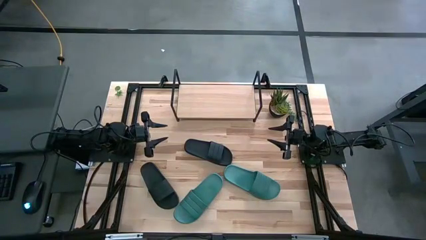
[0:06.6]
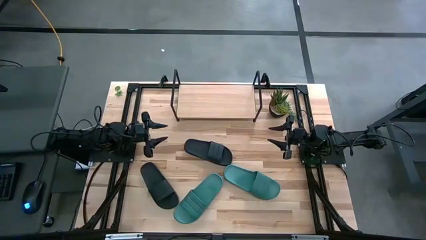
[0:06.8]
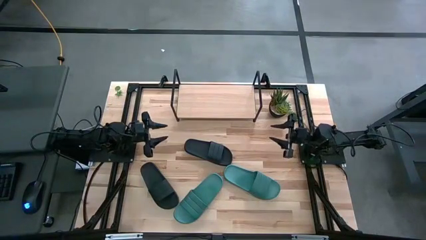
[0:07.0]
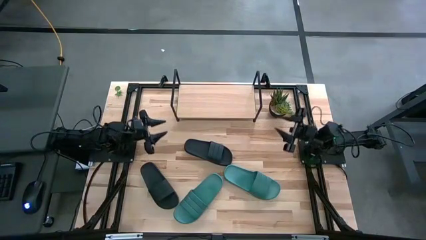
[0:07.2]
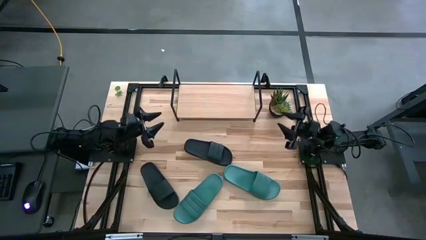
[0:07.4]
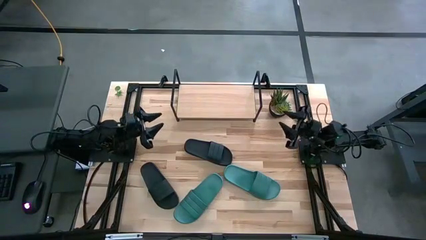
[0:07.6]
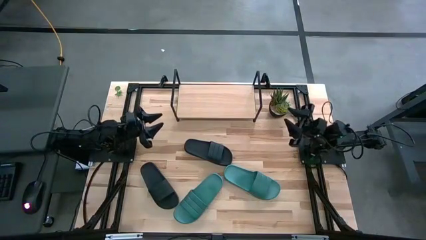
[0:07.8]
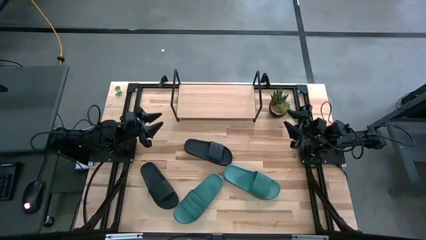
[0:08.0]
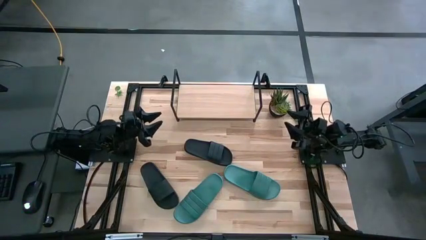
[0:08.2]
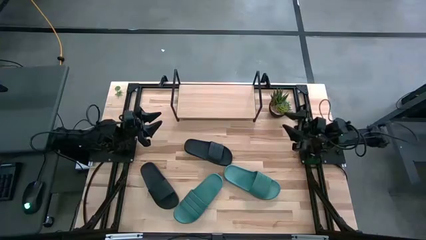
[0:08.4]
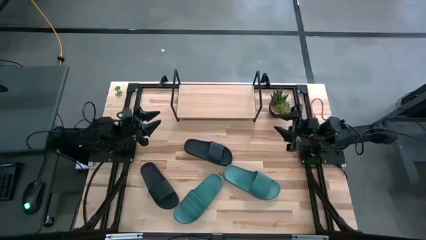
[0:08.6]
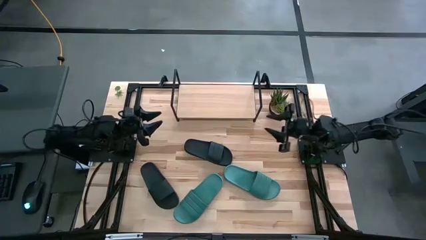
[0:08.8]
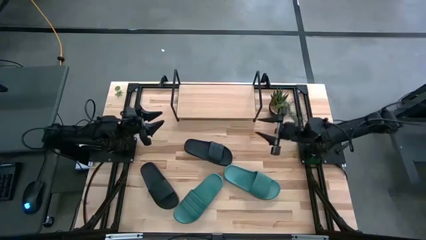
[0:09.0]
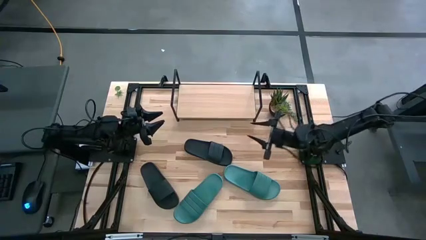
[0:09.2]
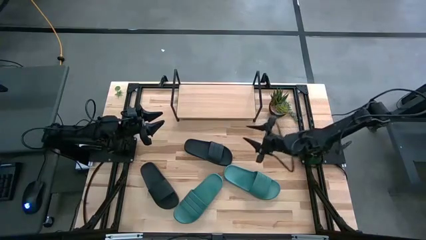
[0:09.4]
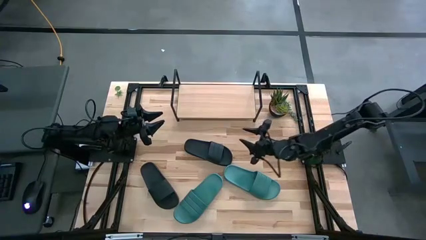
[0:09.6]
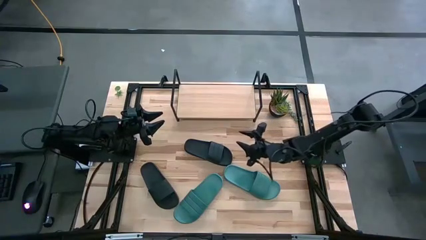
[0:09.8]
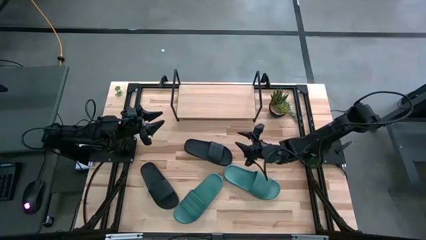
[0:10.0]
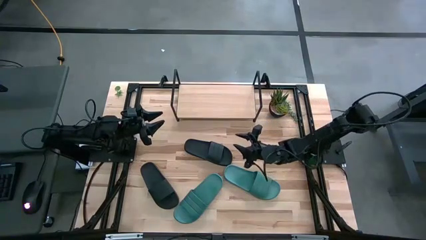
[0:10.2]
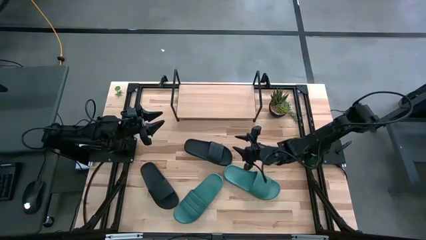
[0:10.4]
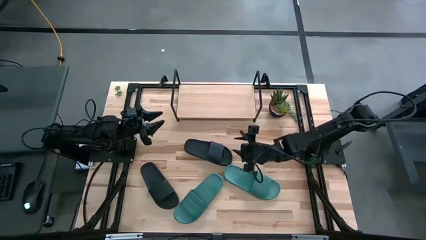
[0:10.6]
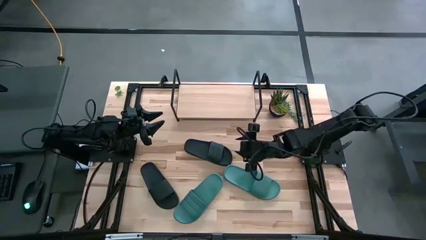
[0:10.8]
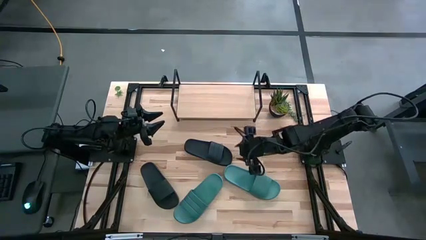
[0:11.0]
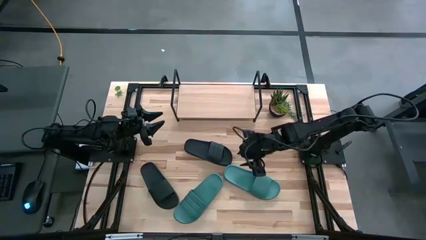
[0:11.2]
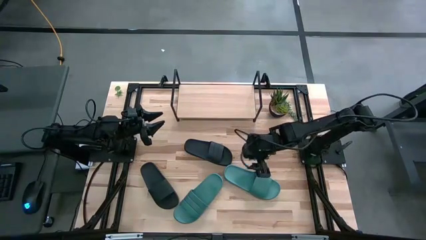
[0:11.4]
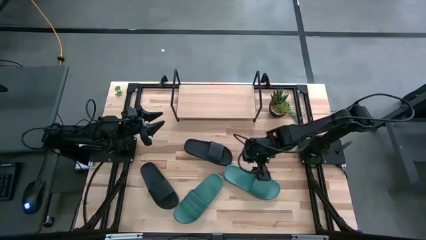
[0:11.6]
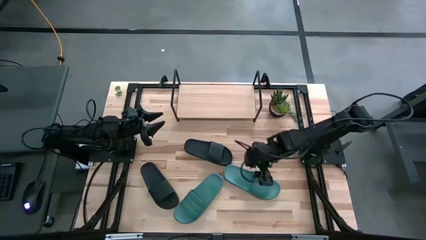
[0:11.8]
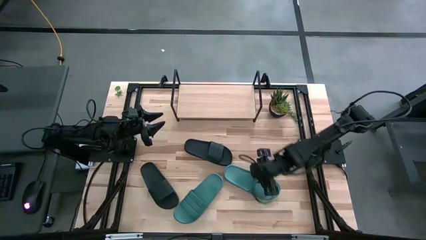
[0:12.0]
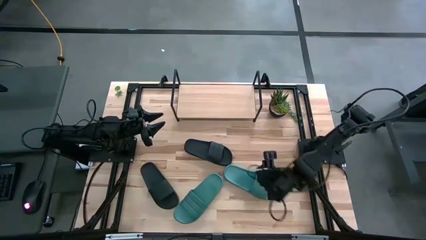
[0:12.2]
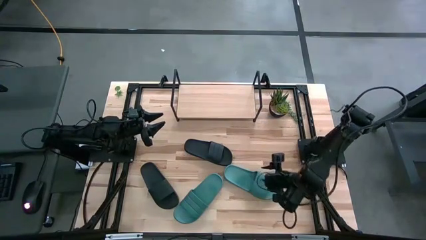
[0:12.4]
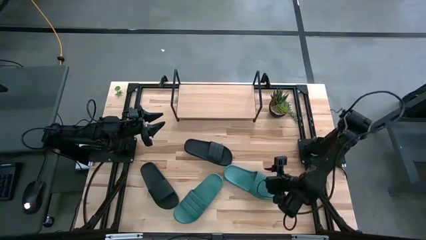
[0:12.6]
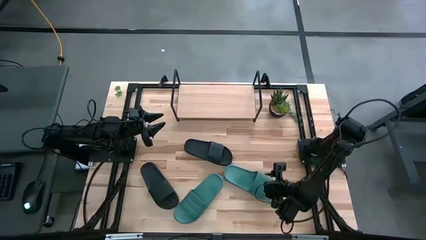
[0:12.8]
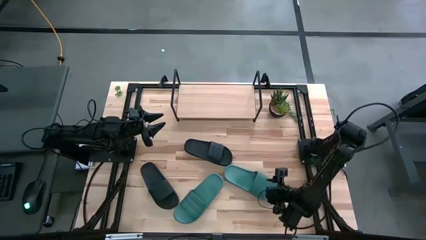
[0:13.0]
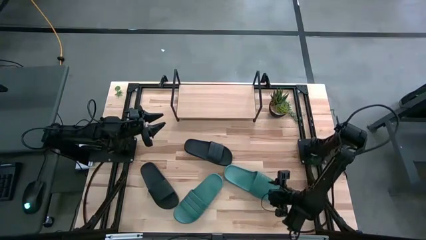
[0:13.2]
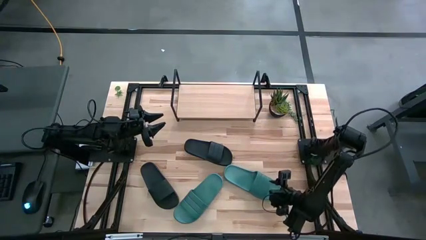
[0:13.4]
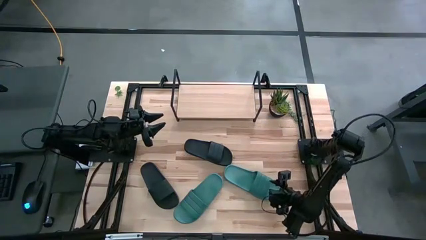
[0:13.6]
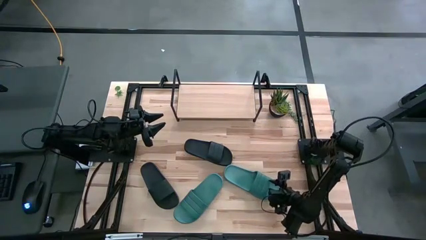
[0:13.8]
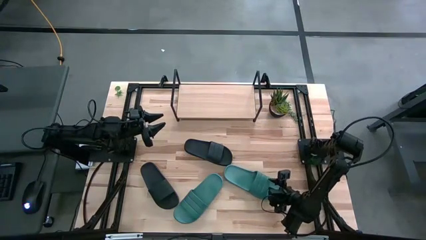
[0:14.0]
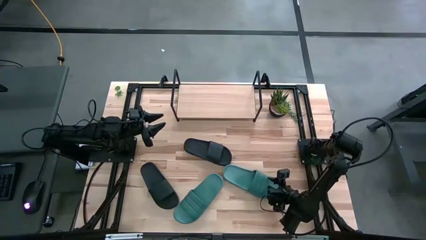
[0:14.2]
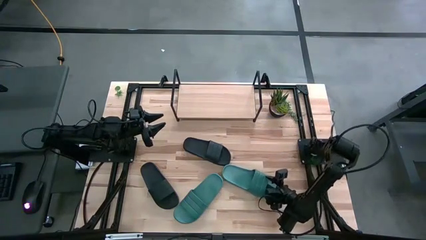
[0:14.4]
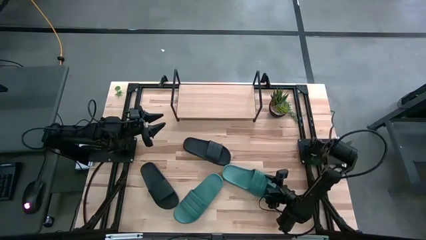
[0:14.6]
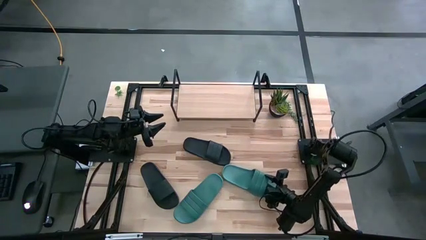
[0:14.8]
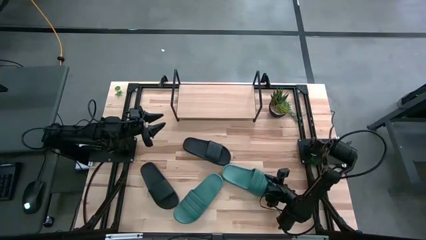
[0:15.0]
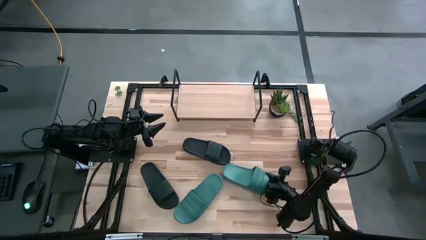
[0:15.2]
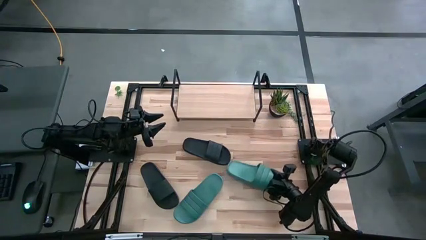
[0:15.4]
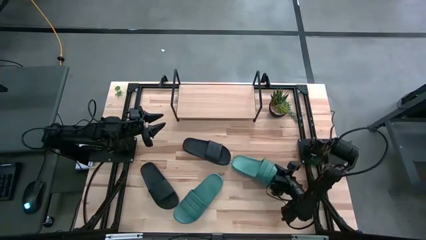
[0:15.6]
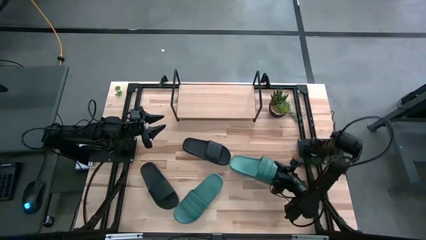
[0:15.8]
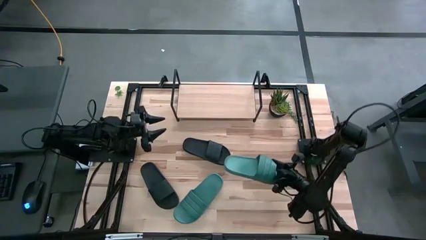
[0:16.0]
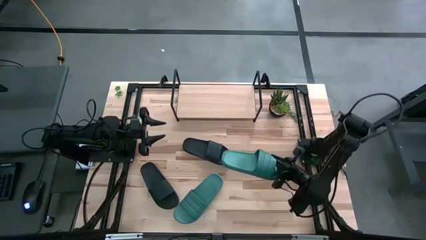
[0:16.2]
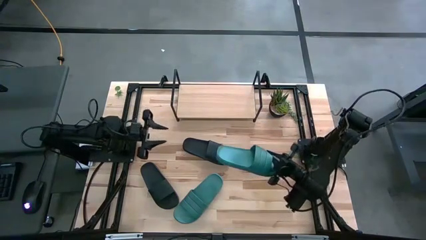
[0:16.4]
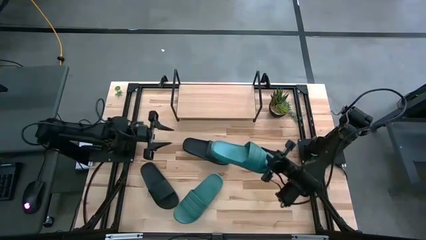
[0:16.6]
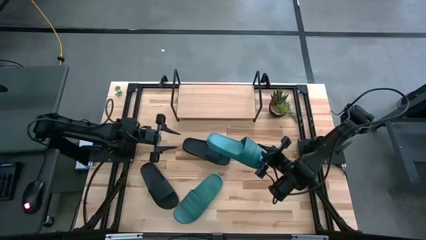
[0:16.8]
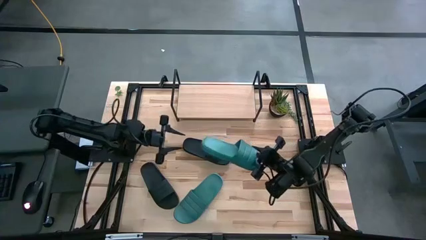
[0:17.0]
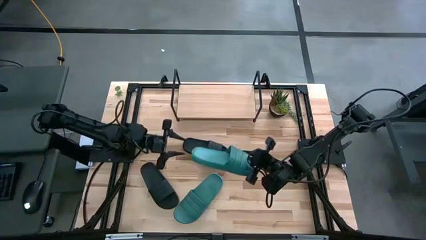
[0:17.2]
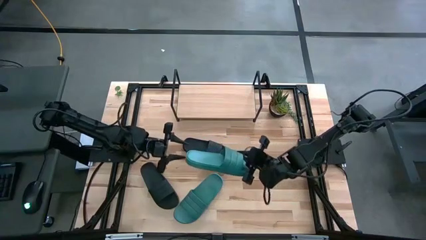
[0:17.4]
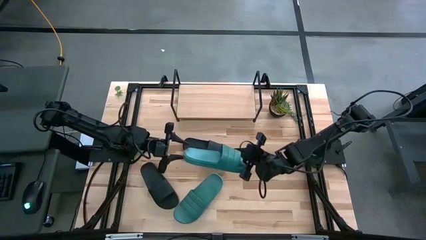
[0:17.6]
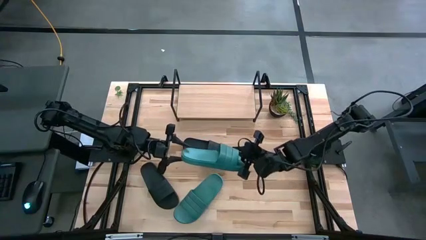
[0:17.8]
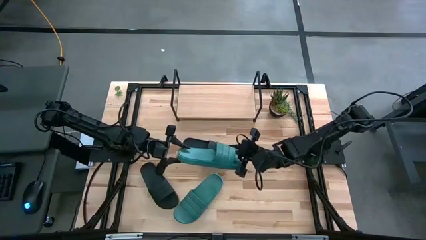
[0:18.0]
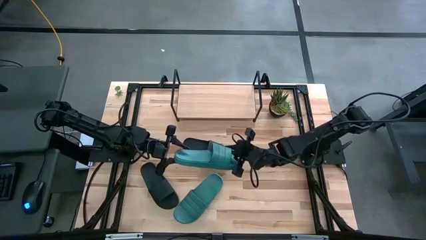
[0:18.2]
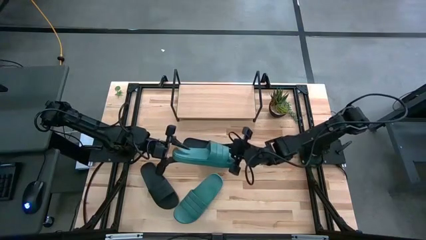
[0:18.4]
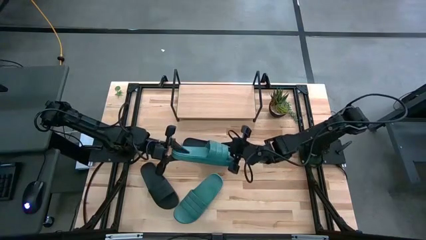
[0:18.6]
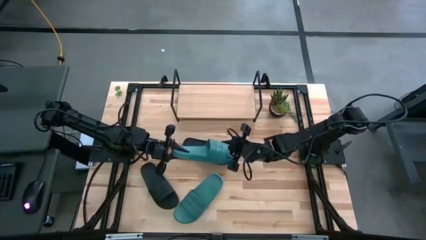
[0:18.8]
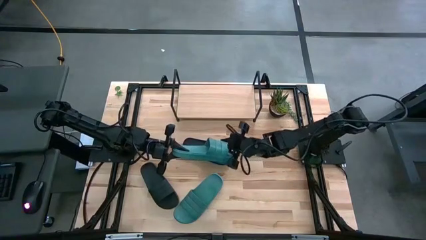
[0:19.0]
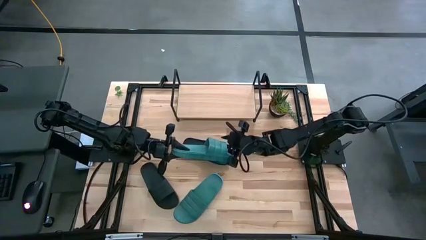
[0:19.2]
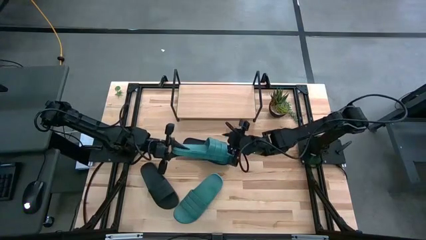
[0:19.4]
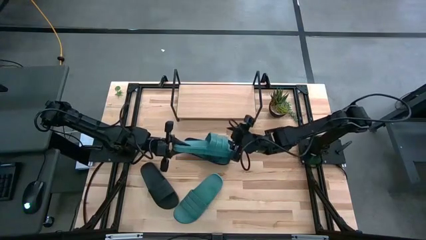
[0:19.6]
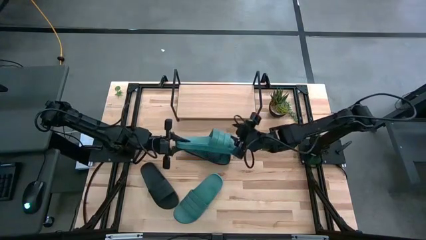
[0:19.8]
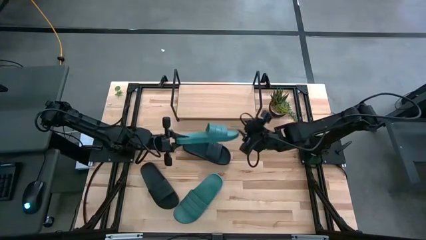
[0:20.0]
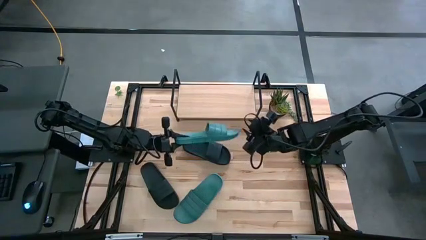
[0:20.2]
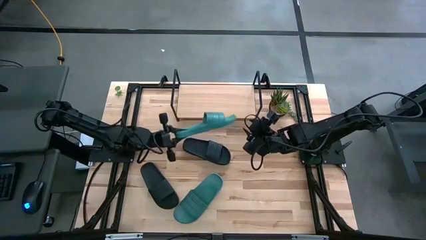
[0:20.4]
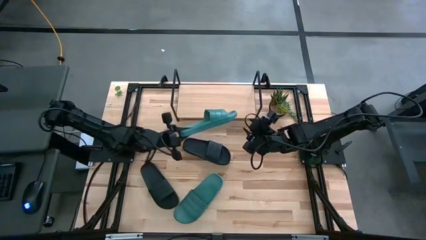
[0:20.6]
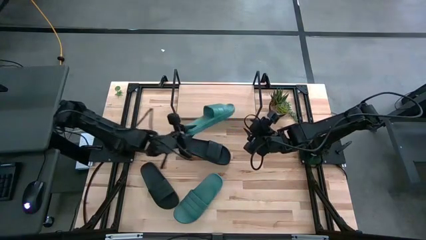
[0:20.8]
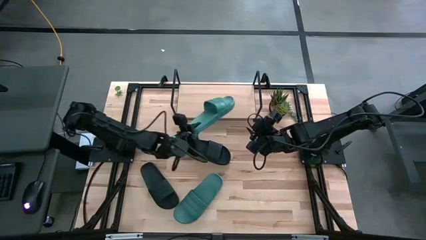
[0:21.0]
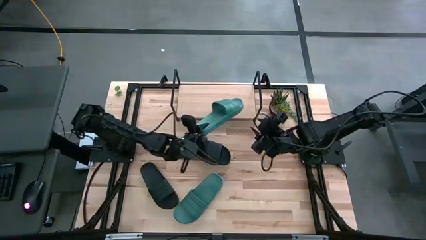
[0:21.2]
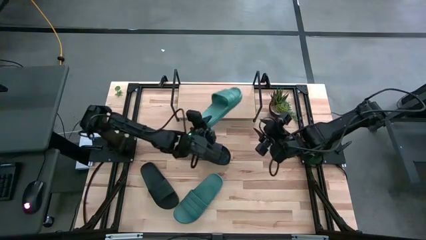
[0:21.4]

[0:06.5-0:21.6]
Task: Pick and place slides into the shelf
Put the right blue slipper on the shelf
